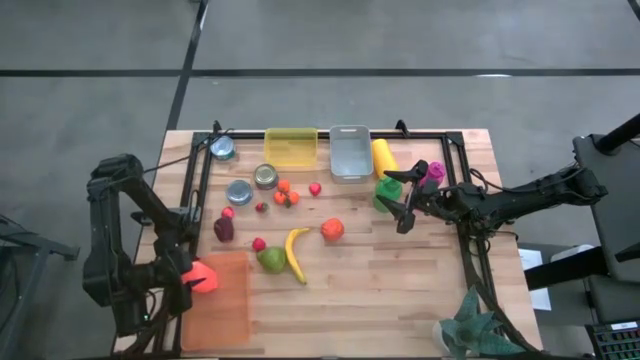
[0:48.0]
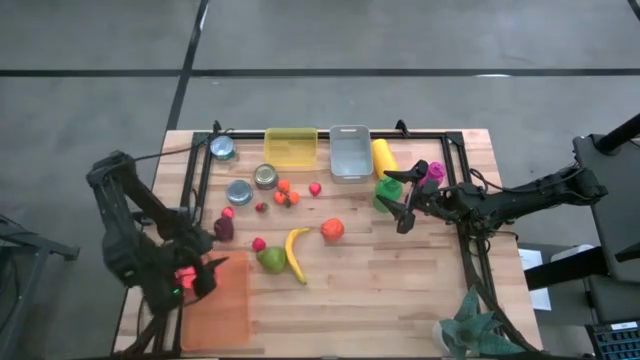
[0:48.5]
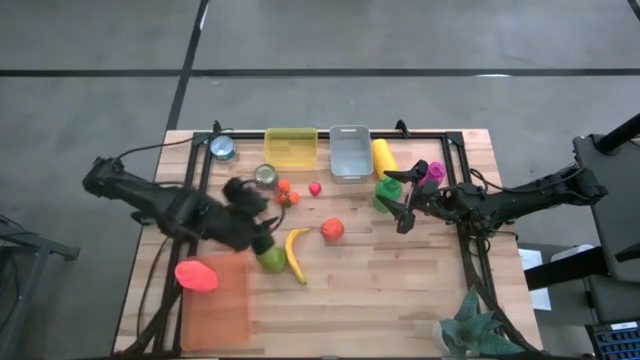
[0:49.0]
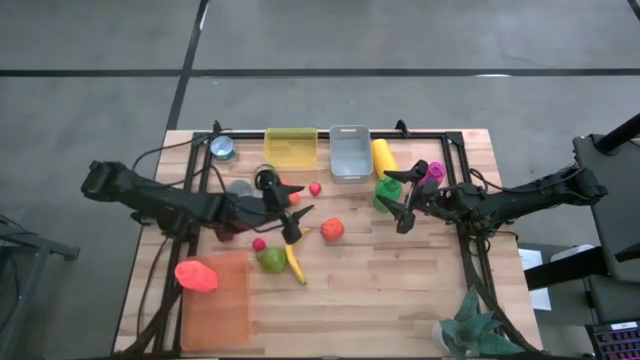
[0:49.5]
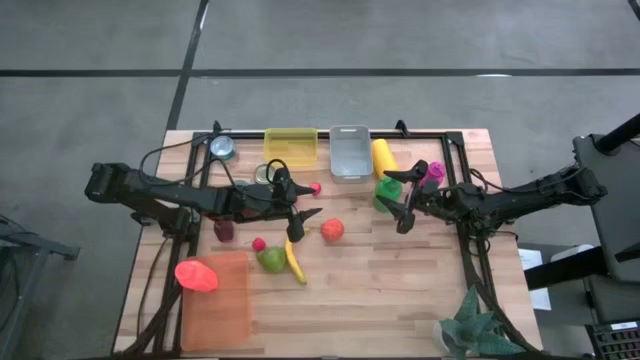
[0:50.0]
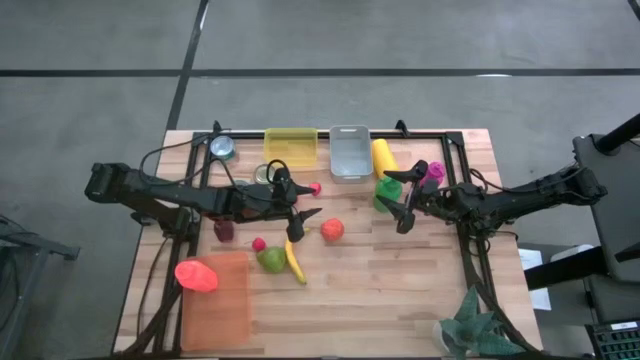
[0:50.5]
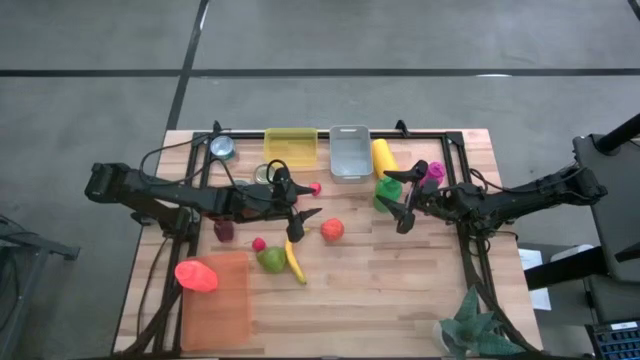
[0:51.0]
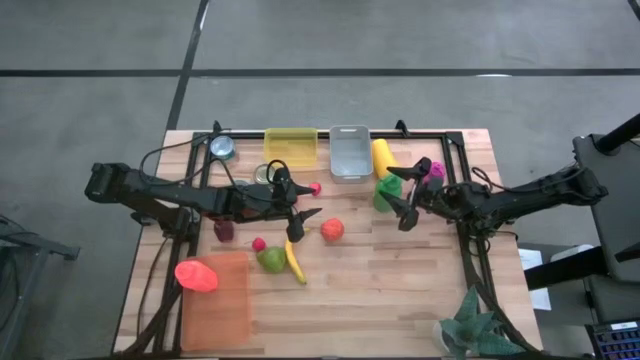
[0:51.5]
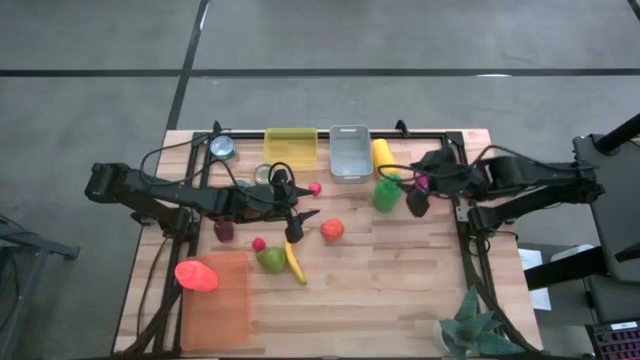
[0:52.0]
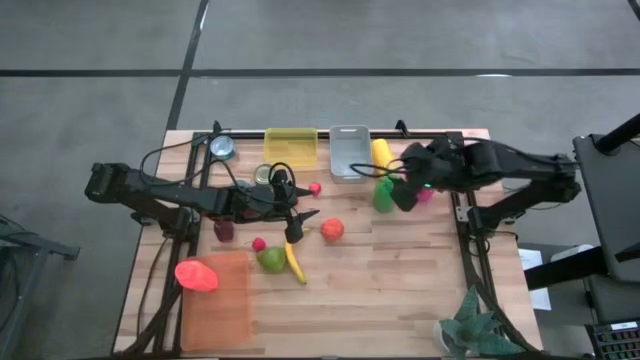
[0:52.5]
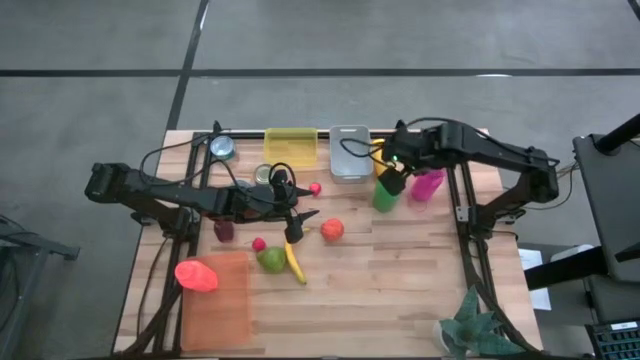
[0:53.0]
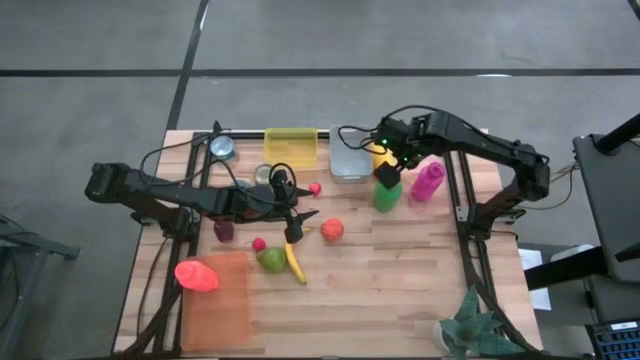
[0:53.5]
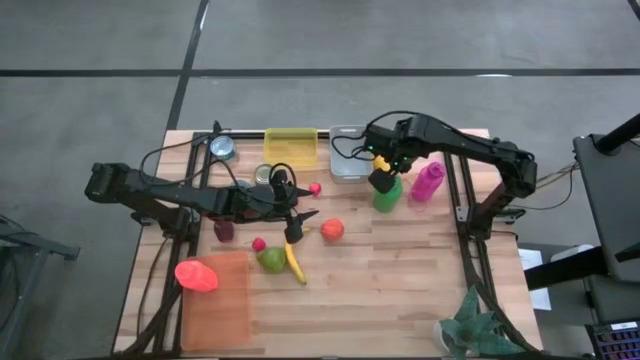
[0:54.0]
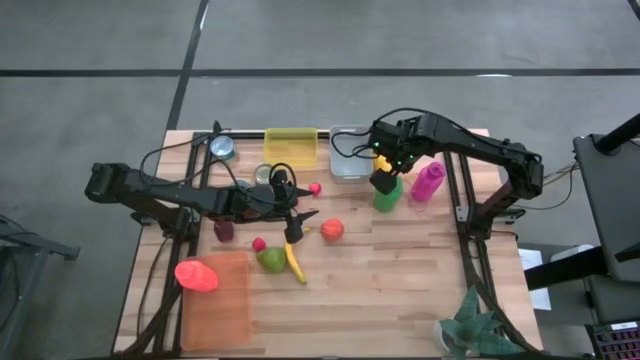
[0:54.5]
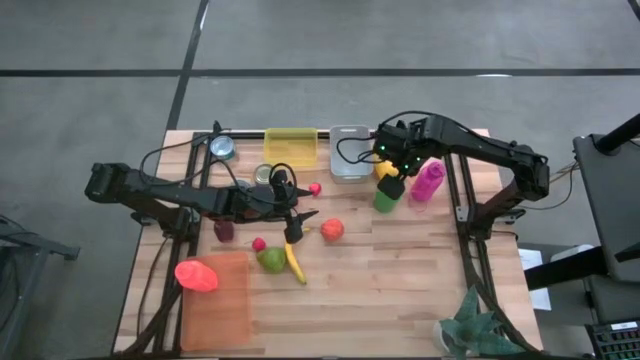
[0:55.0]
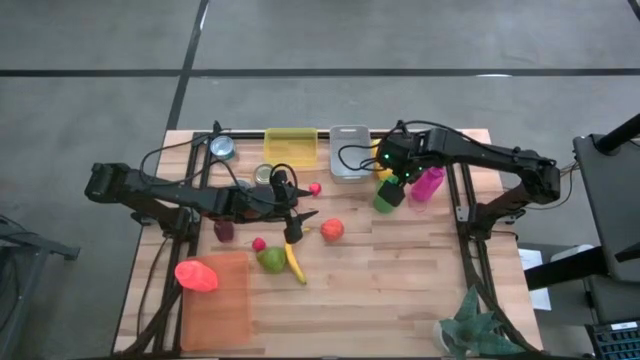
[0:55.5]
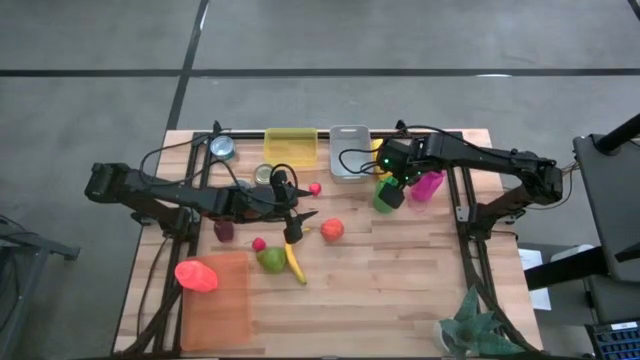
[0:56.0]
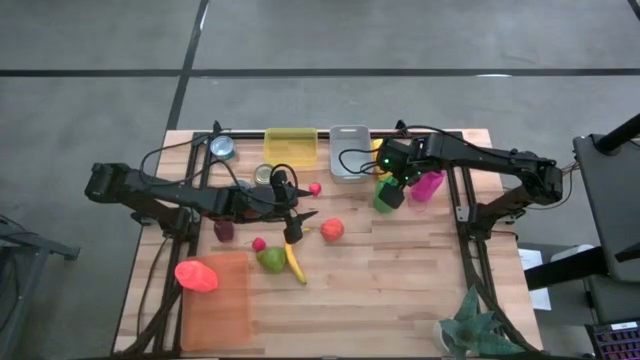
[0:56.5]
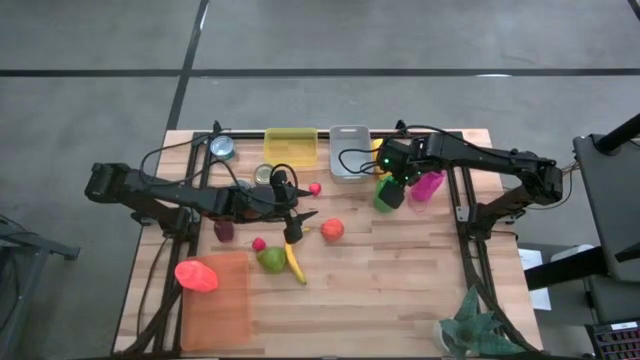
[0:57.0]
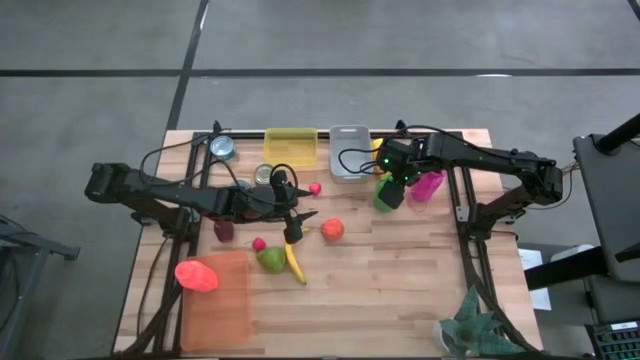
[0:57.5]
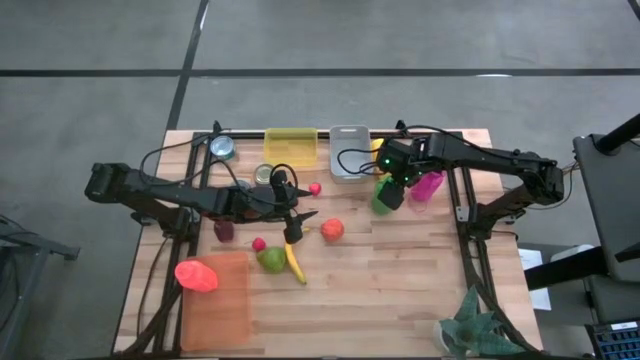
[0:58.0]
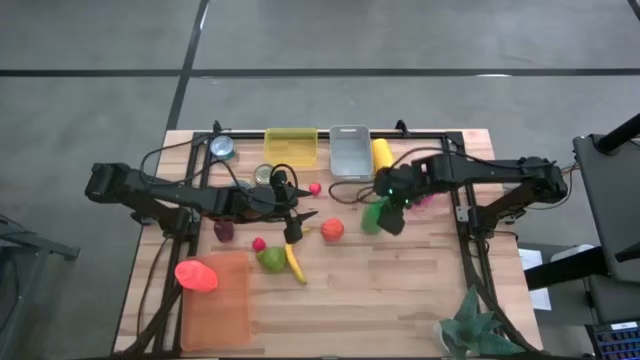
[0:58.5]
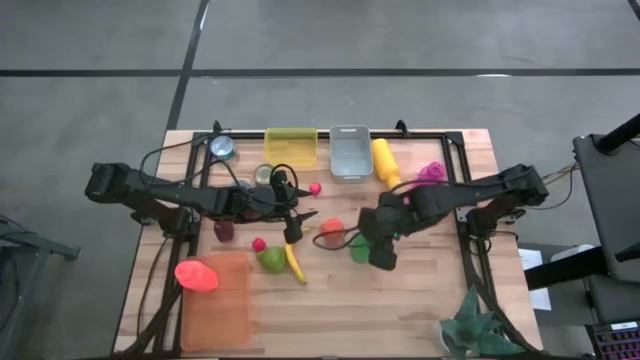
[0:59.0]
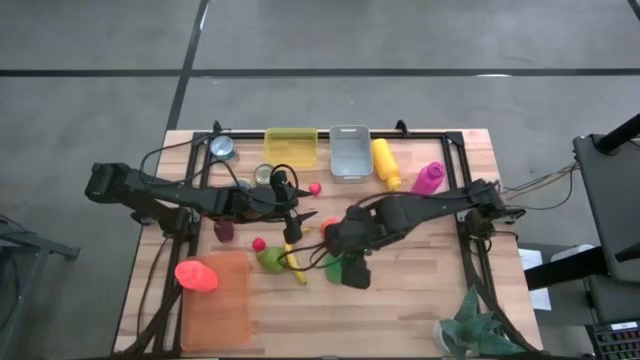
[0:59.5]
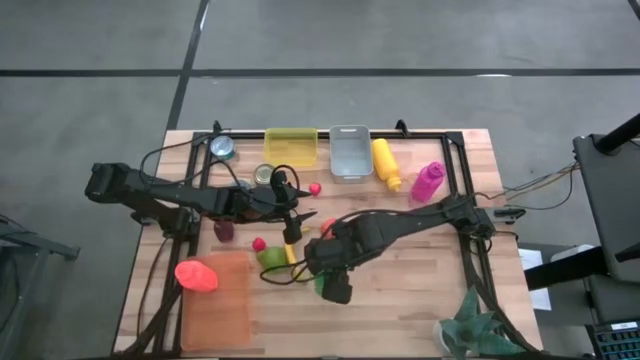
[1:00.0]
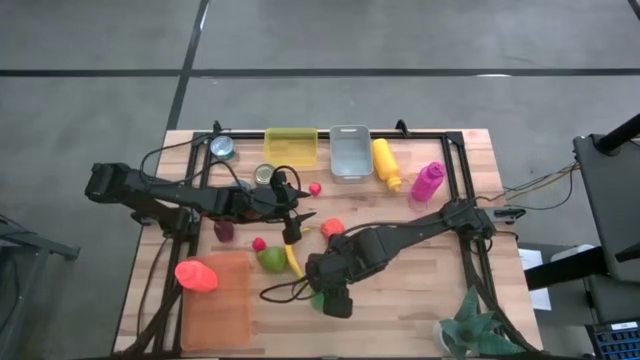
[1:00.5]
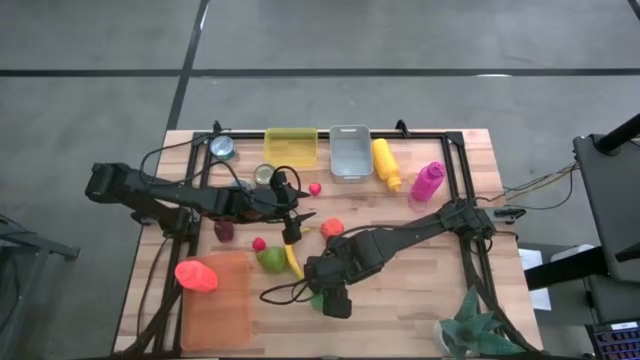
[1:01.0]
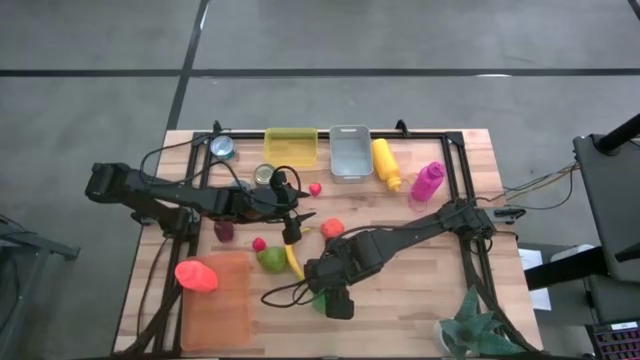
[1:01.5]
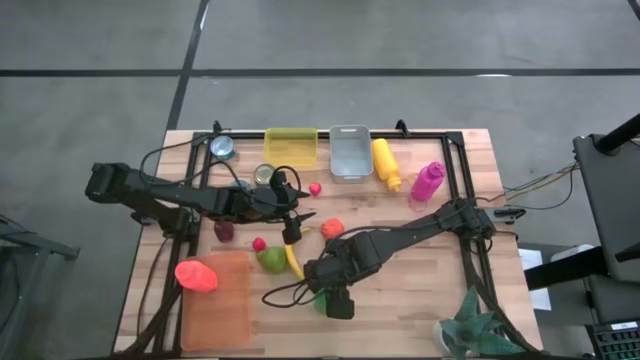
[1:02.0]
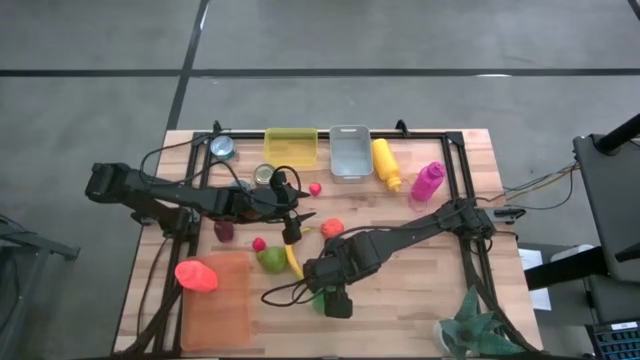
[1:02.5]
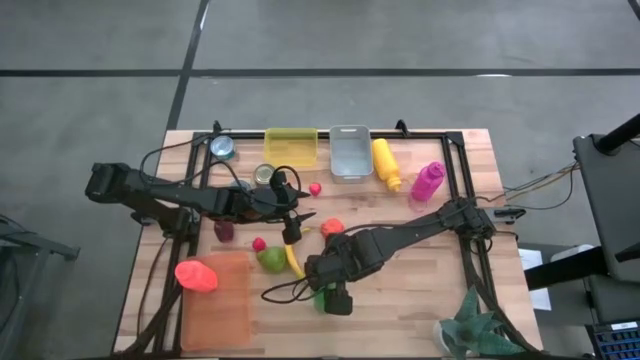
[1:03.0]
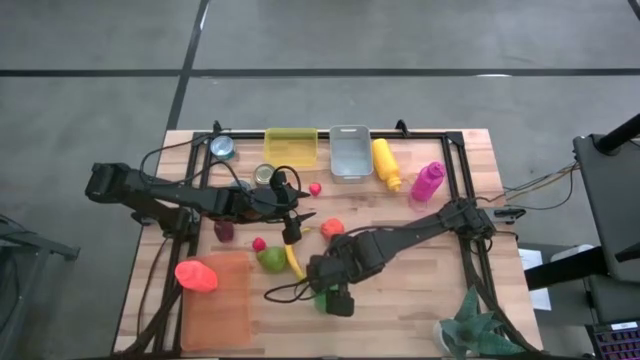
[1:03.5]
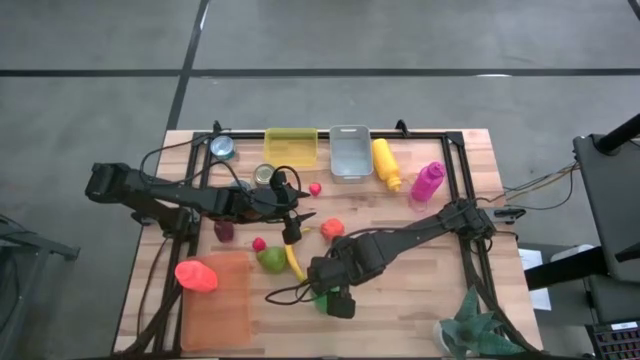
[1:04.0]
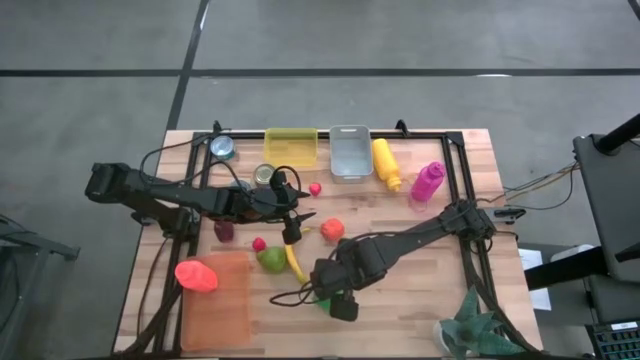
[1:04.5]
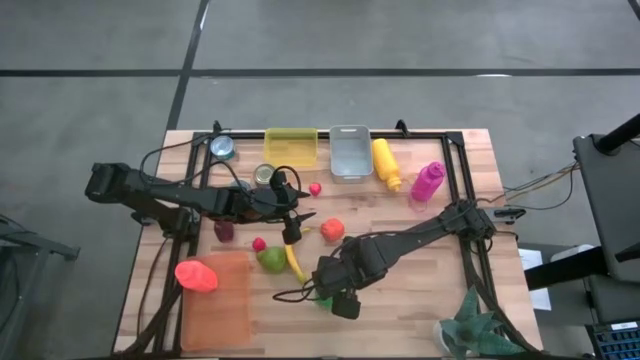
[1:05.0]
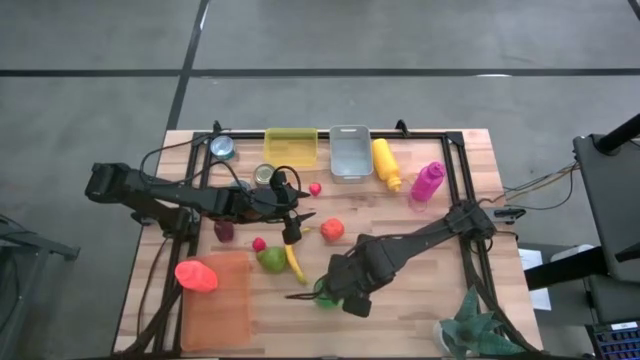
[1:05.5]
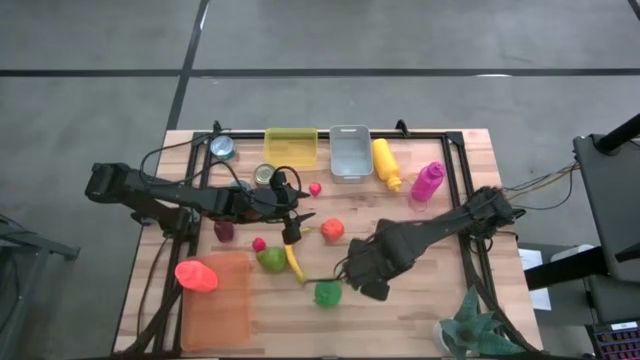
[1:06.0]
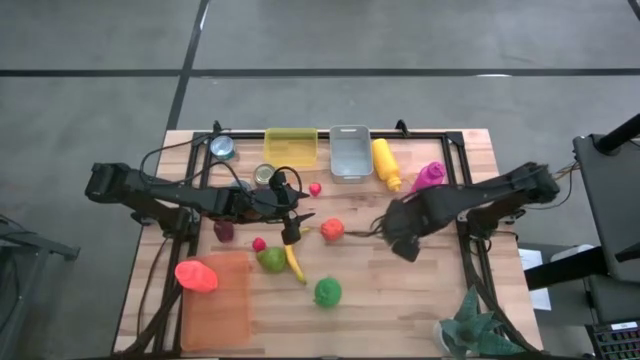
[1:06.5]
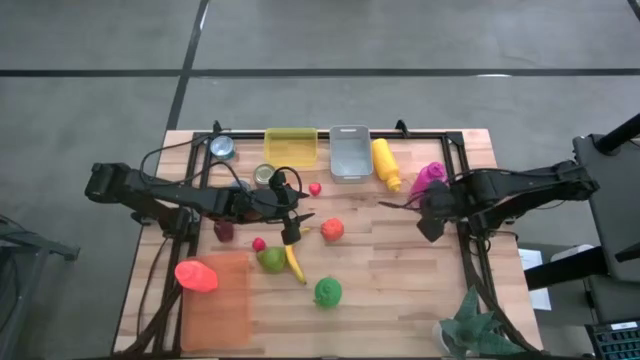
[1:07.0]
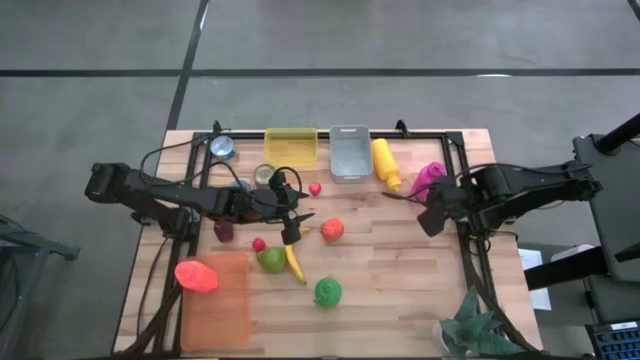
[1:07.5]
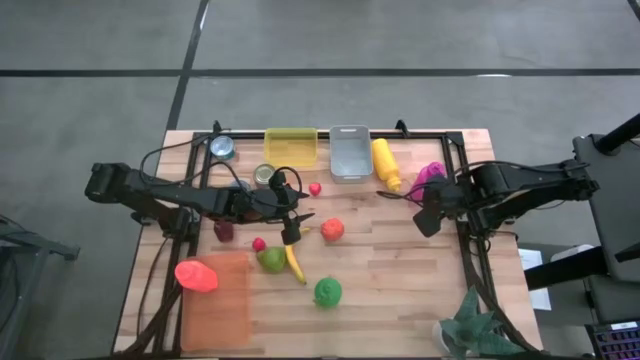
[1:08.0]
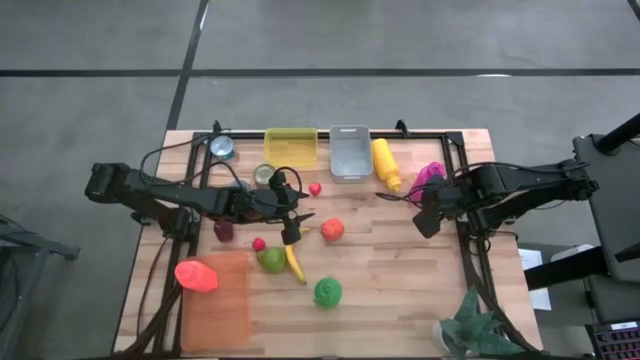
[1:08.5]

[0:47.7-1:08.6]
Task: Pick & Place Food Item
Put the green tumbler into the orange bin
